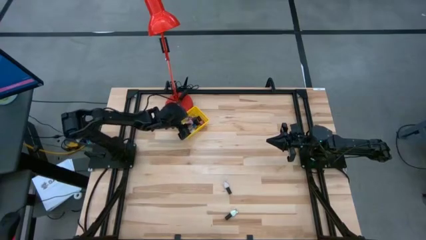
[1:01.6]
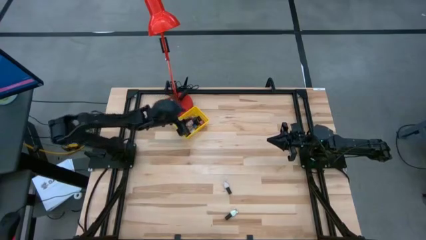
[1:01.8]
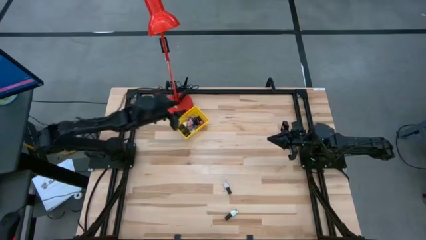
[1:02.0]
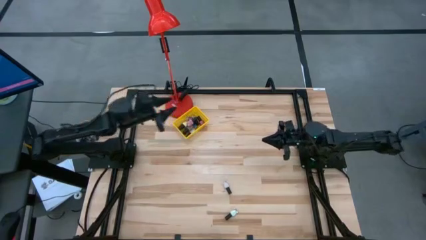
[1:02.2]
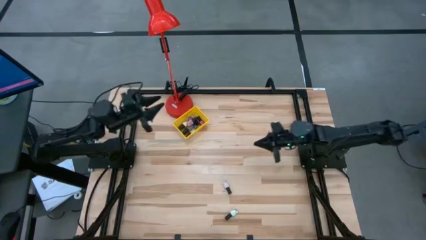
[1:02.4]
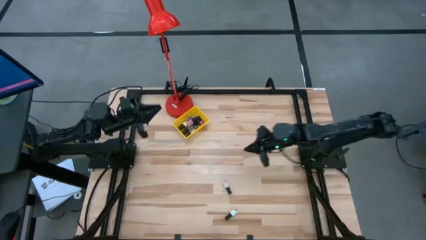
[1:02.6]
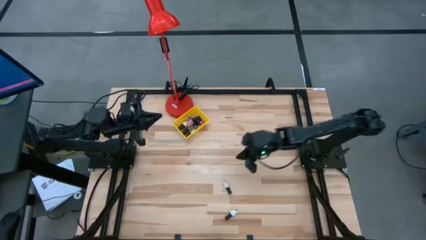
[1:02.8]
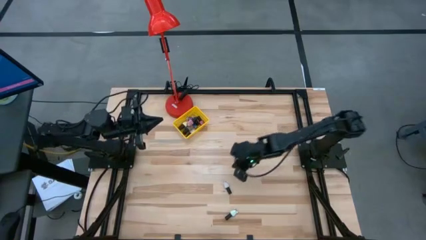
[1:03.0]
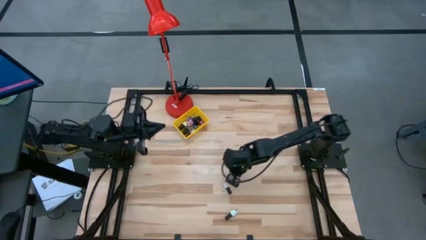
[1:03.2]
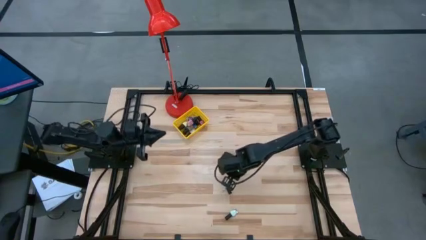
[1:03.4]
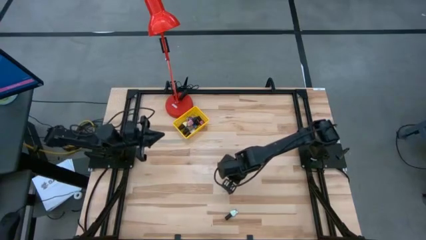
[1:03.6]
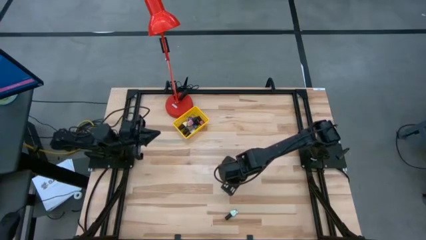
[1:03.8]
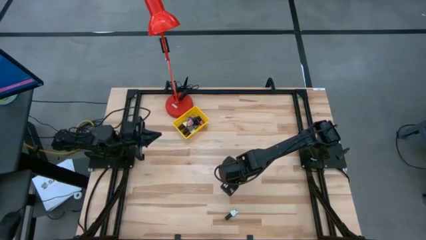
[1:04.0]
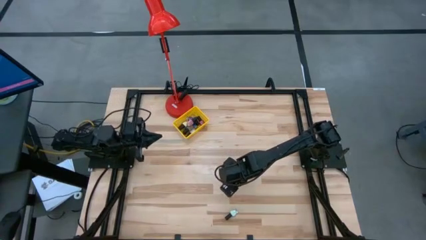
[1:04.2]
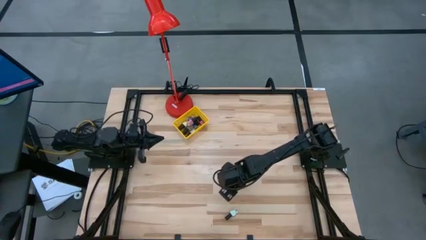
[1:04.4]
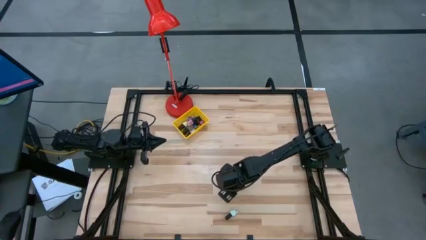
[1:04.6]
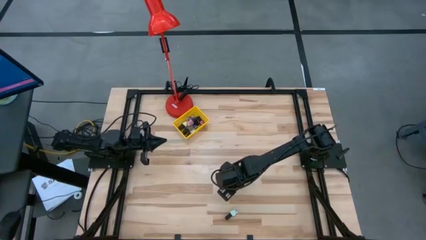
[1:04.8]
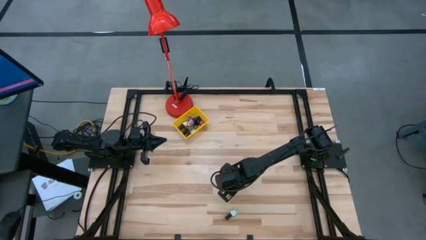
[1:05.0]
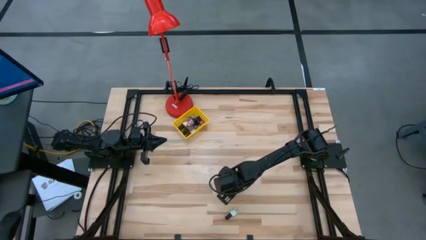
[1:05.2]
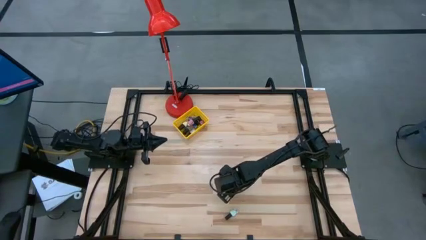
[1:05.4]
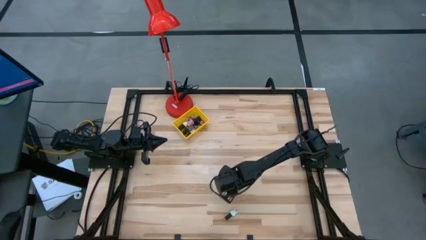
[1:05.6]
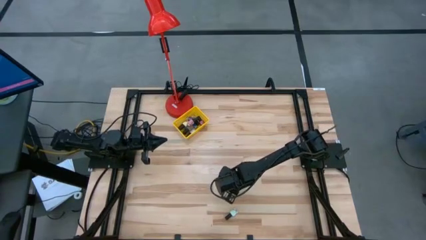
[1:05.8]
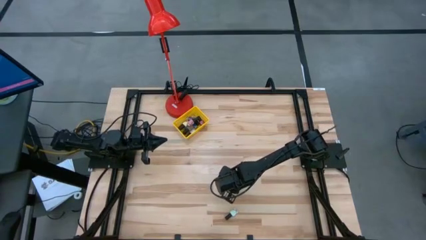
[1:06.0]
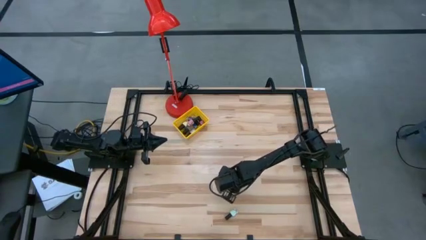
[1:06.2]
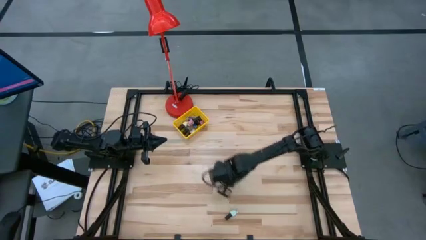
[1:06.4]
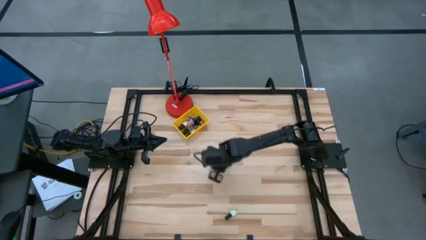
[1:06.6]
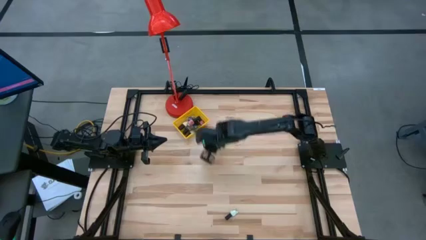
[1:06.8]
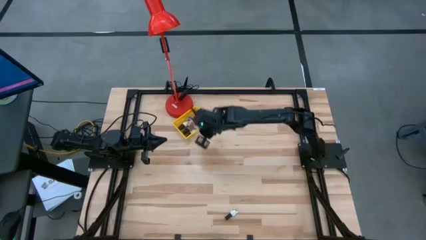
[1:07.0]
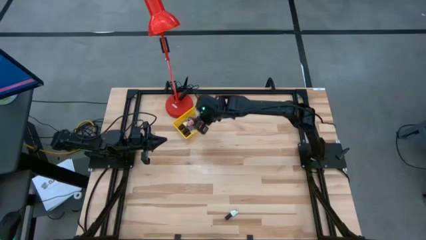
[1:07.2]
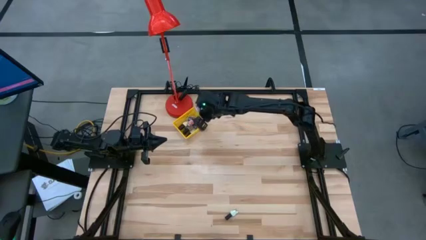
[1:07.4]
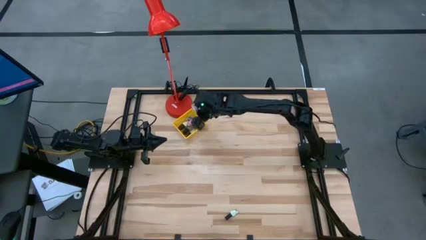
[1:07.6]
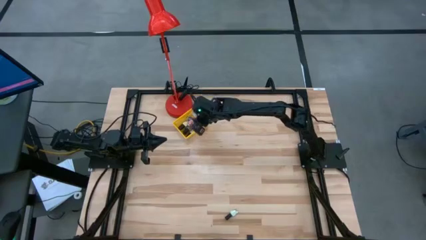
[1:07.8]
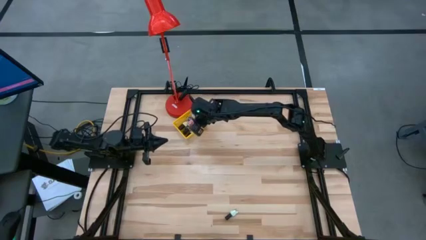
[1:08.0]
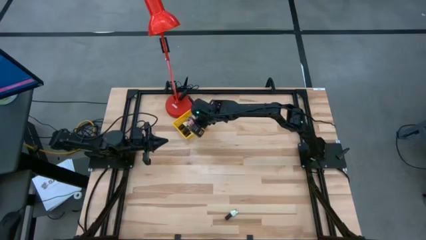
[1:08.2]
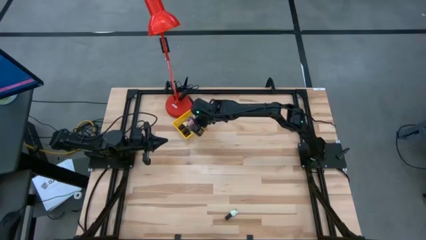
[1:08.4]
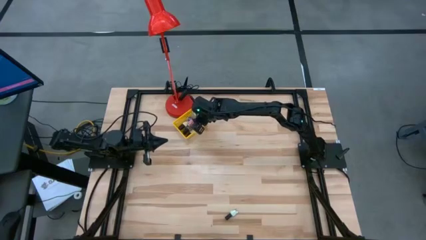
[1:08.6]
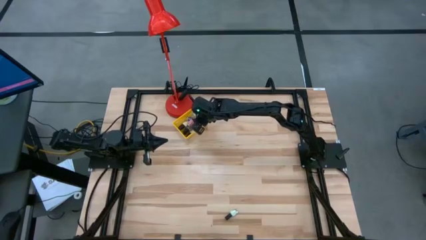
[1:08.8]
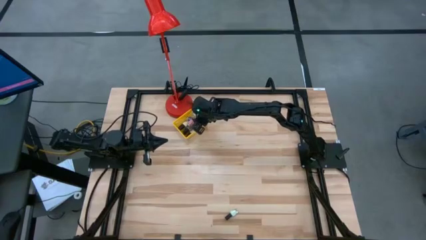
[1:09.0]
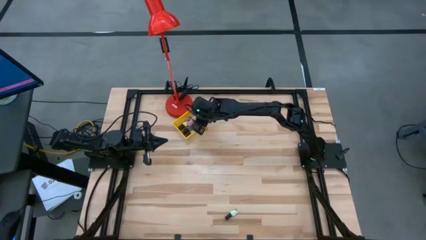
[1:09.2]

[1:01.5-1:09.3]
Task: Pick & Place Nail Polish
Put the white nail polish into the yellow basket

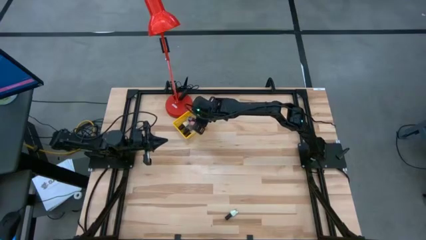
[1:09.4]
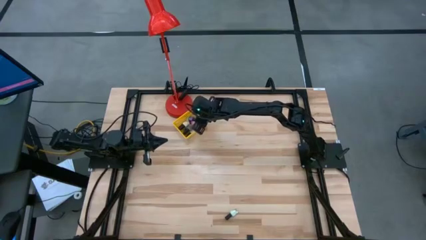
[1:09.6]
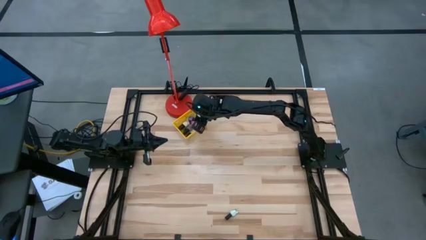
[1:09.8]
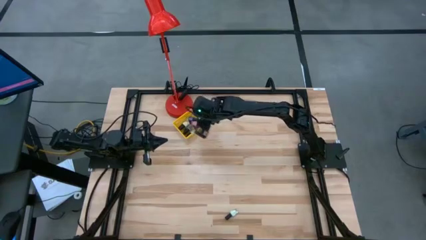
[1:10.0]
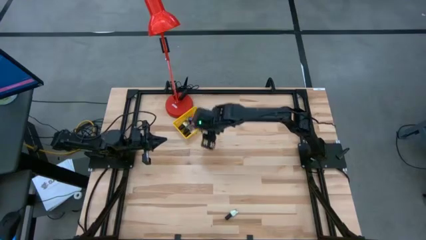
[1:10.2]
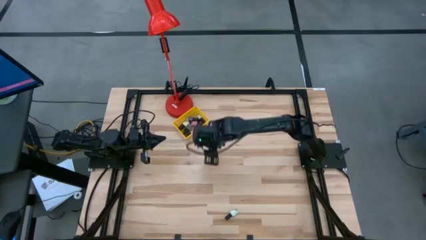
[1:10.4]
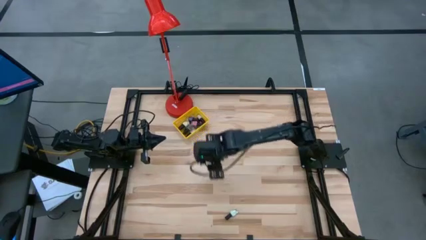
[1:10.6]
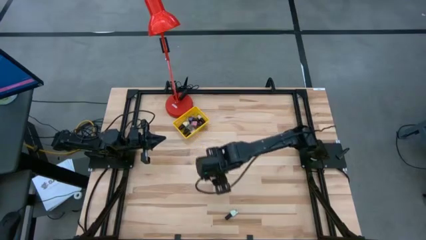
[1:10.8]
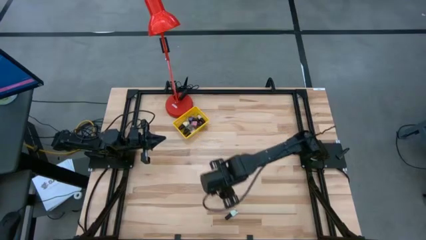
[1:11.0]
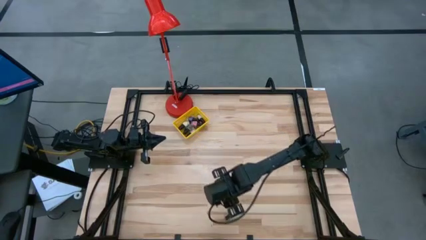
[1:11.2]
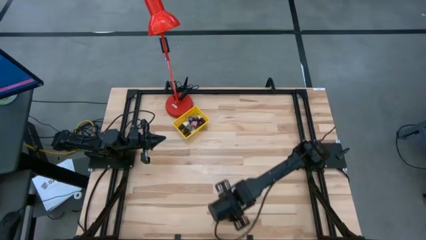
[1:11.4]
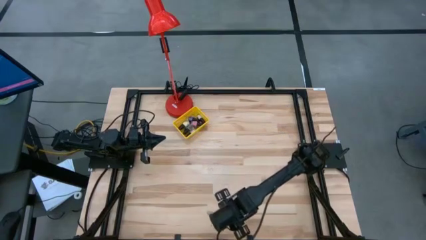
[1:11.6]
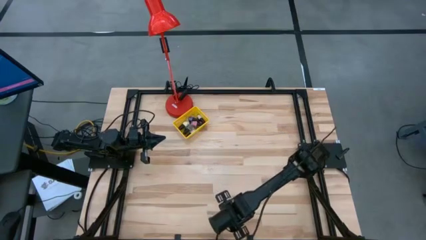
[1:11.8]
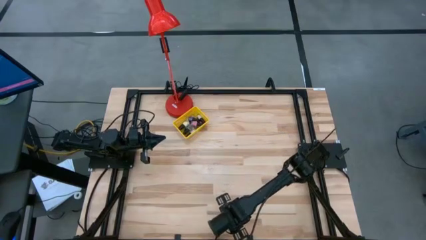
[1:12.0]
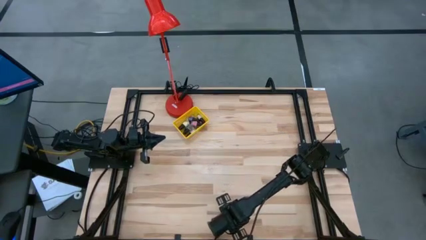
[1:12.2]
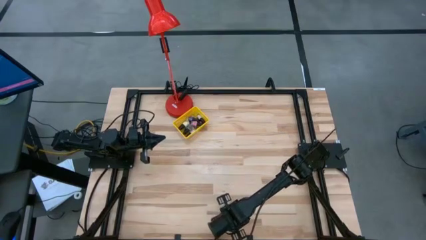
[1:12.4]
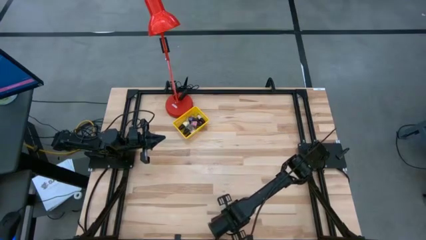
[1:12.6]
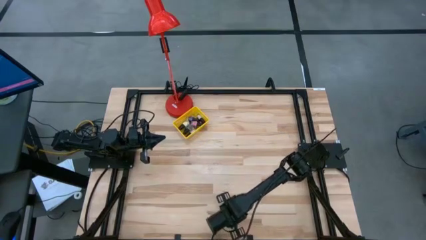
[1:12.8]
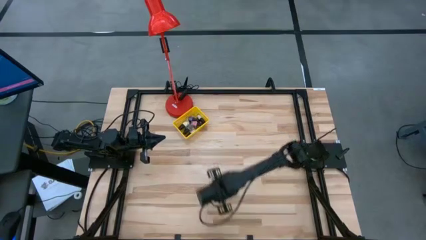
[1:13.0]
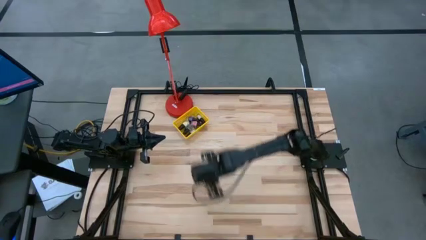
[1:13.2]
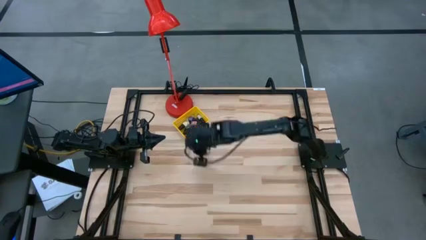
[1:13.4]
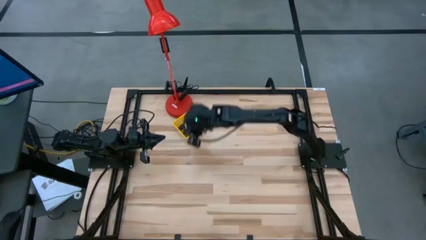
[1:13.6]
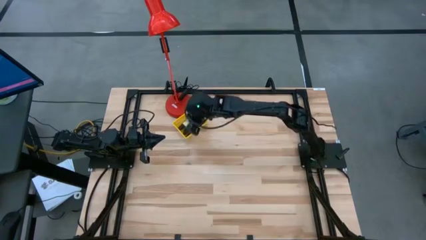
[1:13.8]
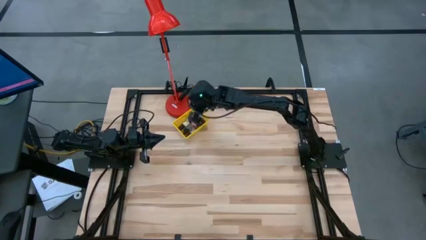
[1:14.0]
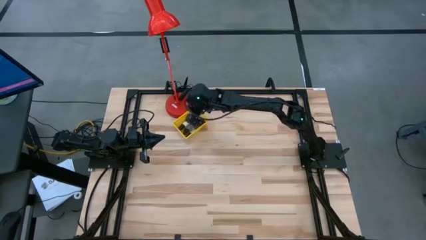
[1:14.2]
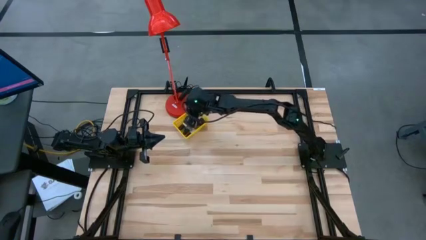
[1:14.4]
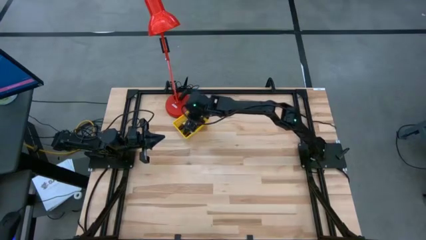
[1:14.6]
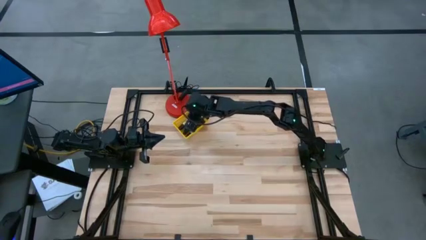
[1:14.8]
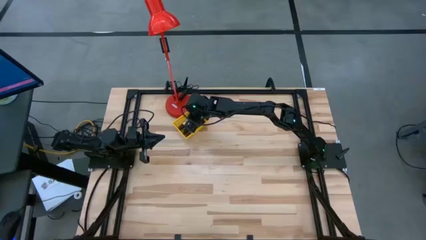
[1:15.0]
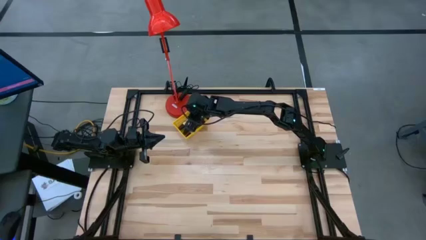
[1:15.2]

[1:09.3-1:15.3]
Put the green nail polish into the yellow basket

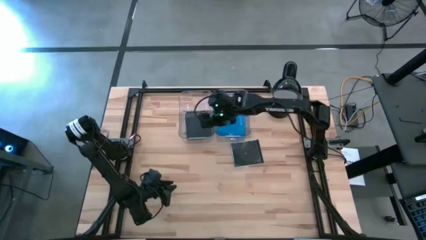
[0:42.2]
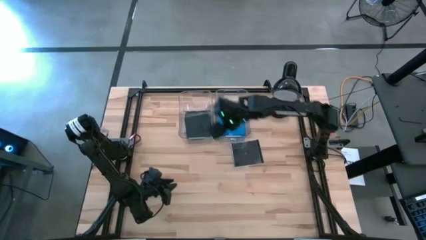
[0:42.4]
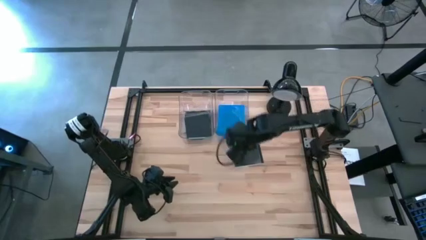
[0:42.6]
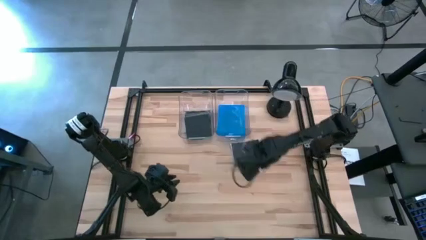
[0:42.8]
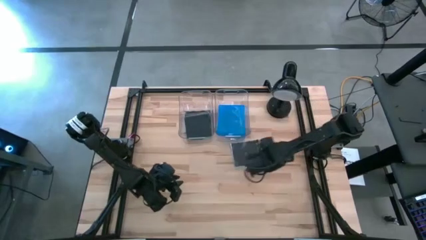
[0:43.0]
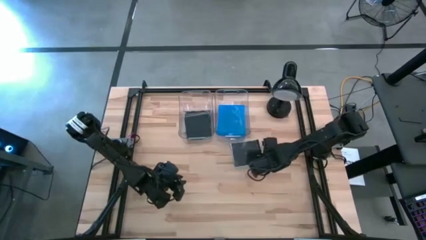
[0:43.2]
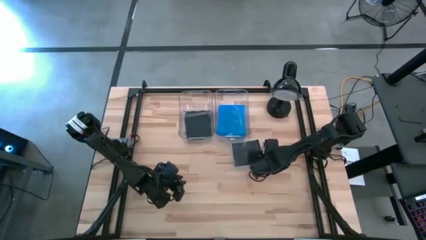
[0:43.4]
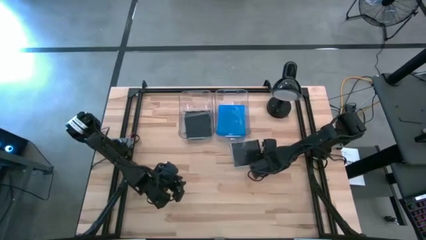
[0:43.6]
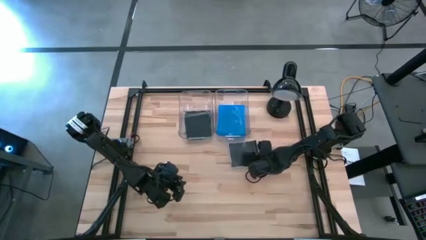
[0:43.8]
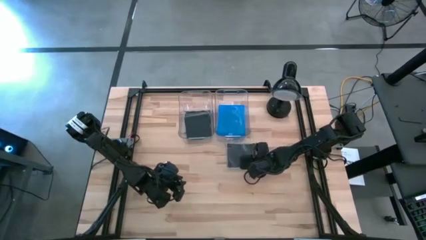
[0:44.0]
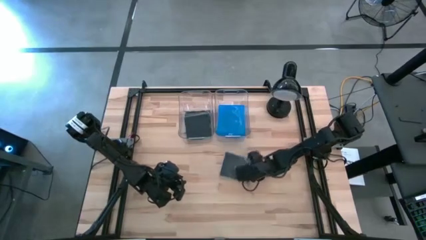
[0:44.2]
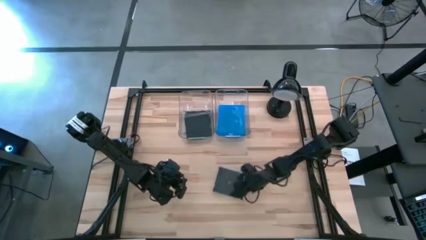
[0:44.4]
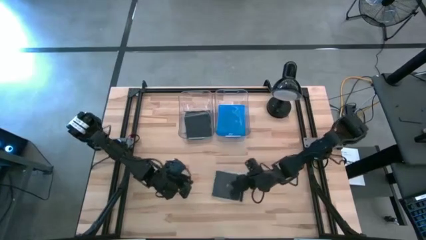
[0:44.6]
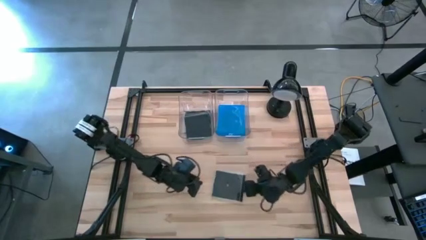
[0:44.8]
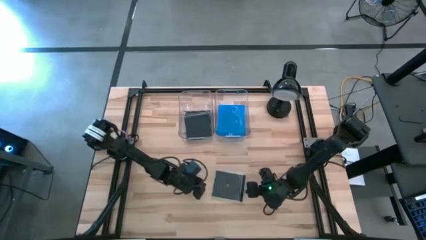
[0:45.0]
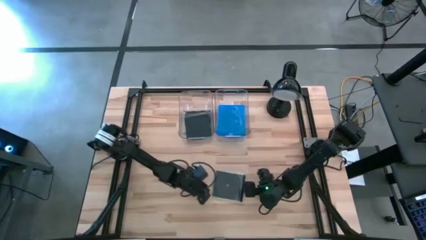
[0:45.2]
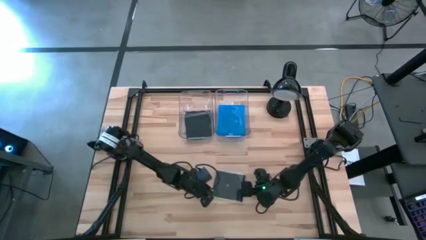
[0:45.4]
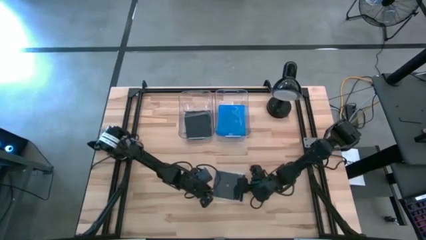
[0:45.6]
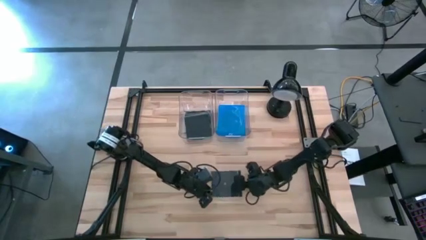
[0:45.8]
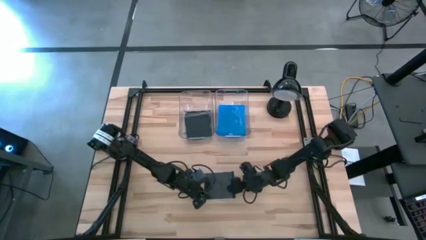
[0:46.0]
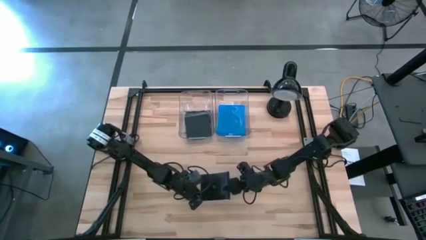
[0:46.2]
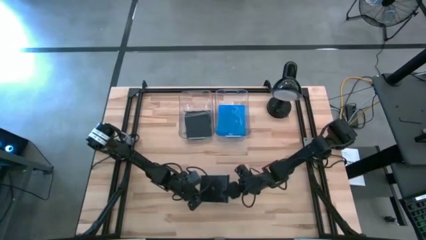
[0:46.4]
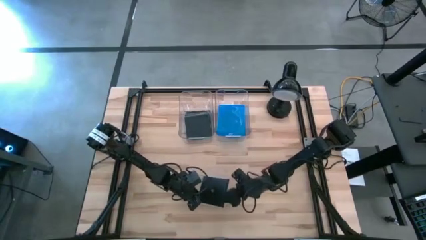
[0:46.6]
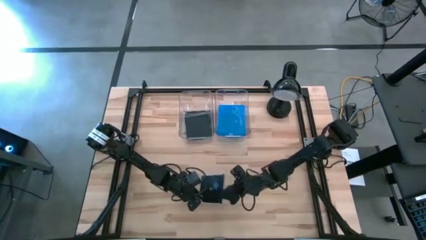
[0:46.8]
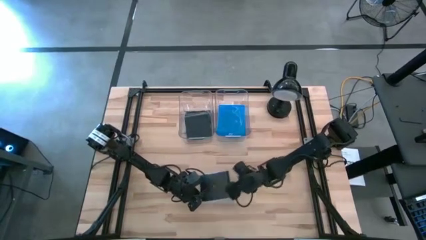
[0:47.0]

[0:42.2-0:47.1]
Task: Pick & place jewel cases by type
Put the black CD case into the left transparent bin
